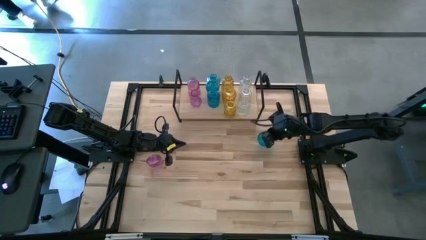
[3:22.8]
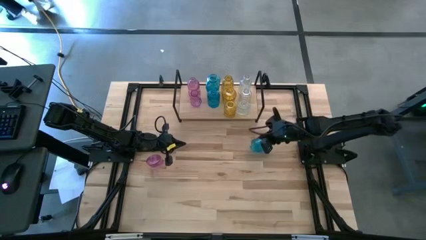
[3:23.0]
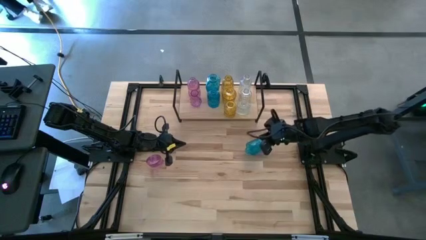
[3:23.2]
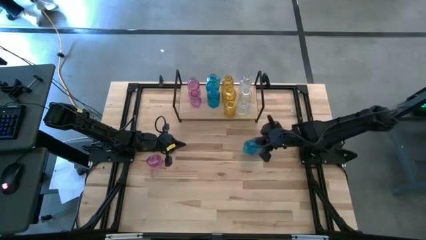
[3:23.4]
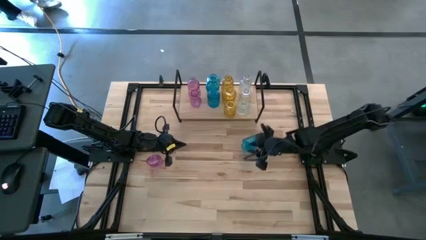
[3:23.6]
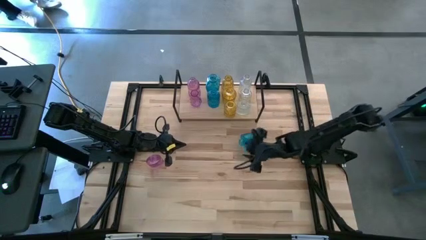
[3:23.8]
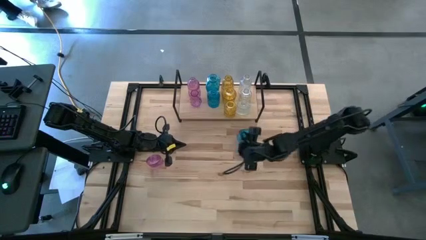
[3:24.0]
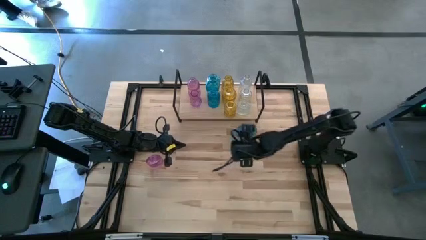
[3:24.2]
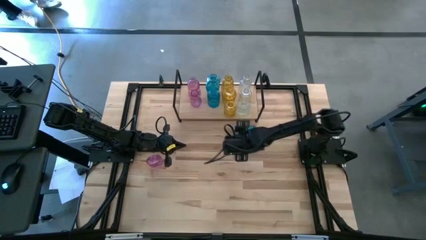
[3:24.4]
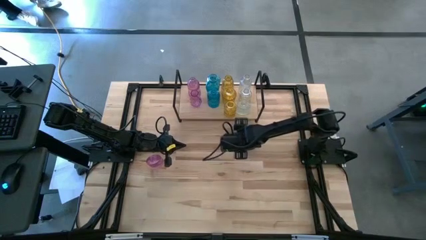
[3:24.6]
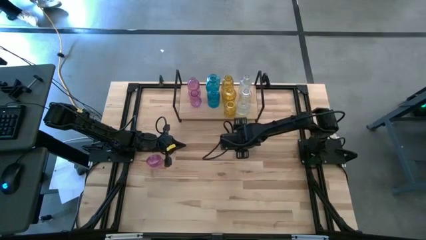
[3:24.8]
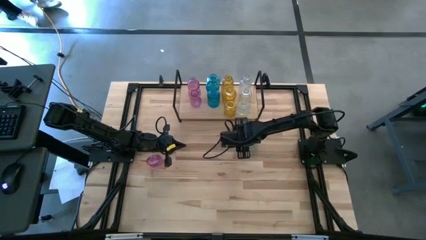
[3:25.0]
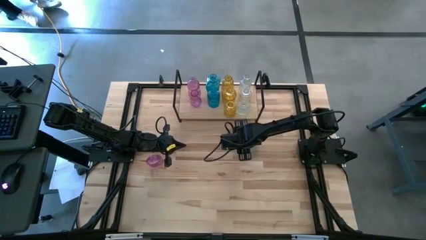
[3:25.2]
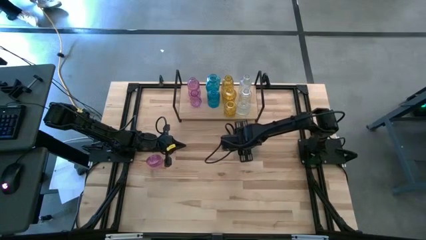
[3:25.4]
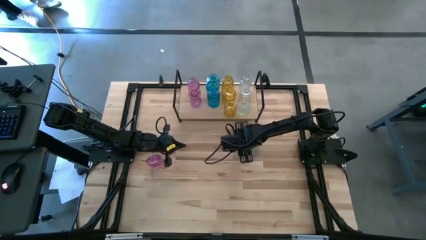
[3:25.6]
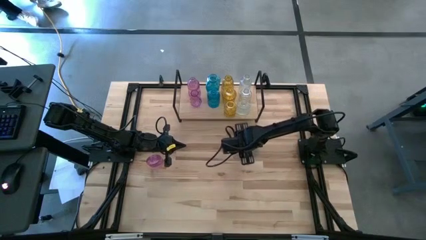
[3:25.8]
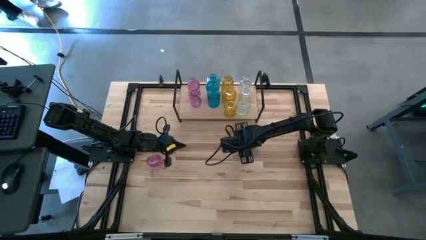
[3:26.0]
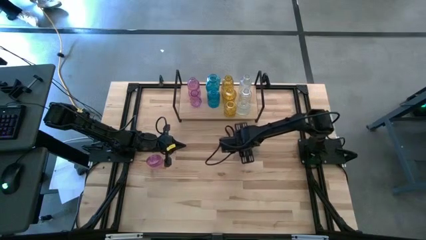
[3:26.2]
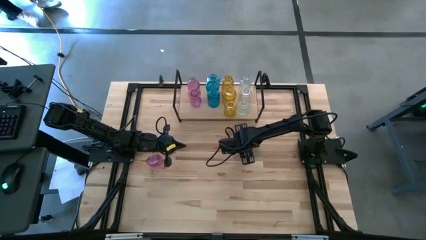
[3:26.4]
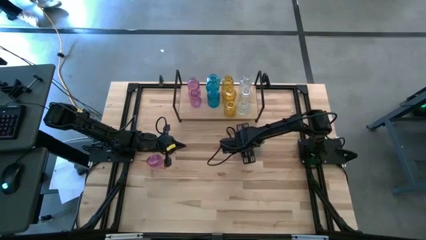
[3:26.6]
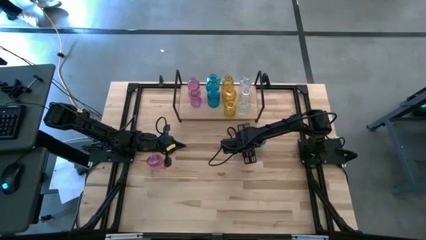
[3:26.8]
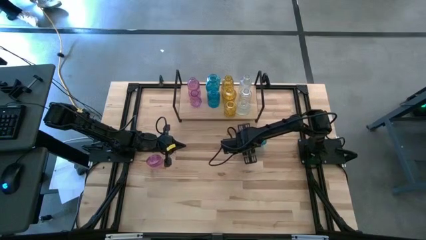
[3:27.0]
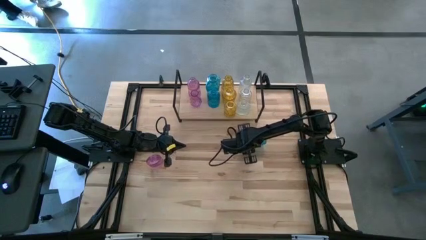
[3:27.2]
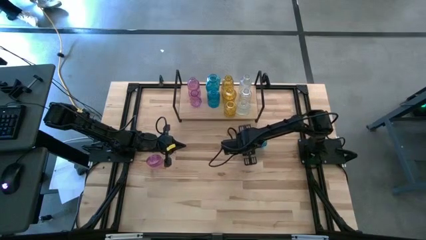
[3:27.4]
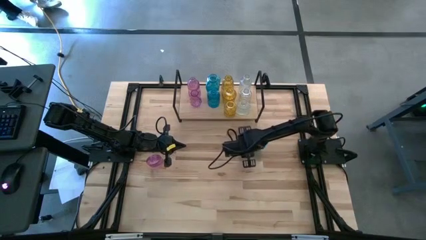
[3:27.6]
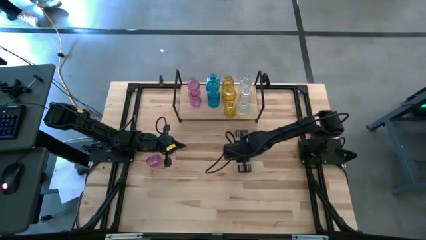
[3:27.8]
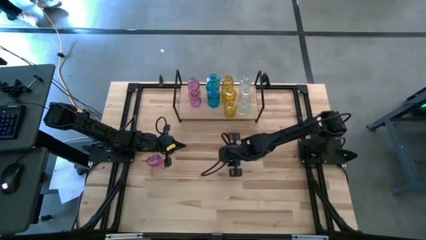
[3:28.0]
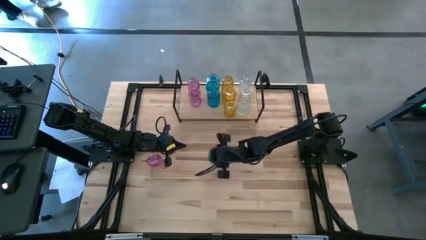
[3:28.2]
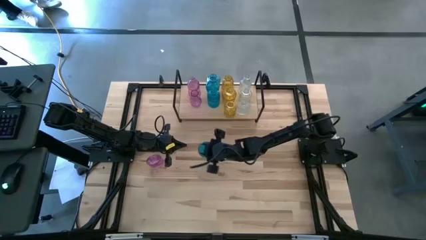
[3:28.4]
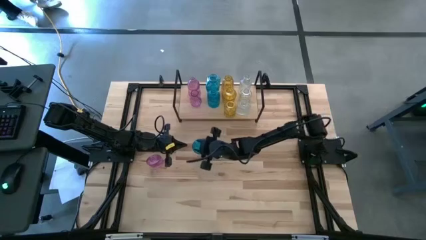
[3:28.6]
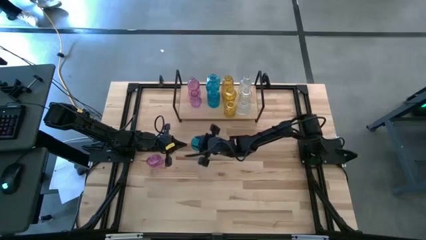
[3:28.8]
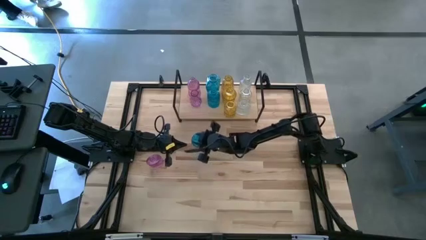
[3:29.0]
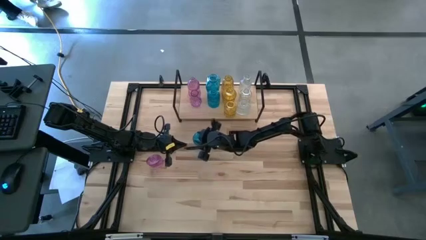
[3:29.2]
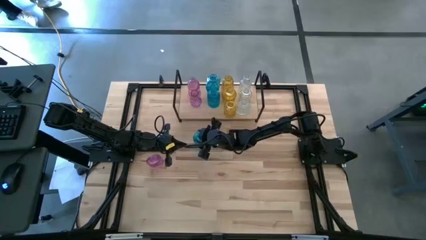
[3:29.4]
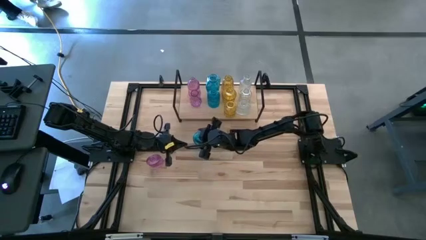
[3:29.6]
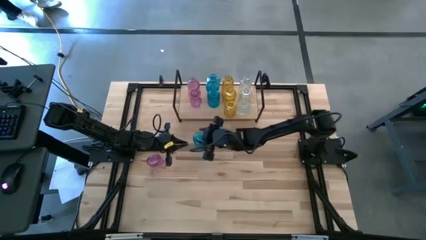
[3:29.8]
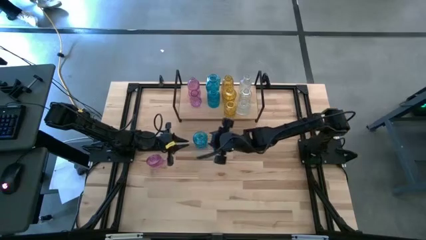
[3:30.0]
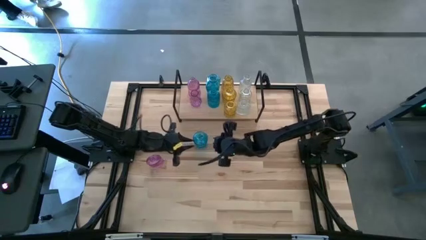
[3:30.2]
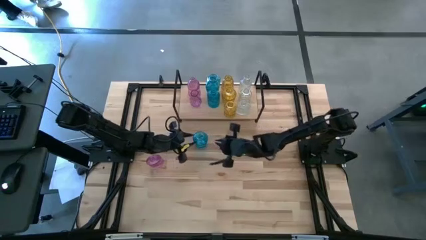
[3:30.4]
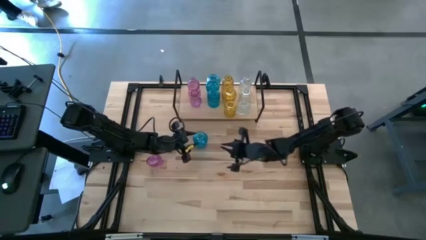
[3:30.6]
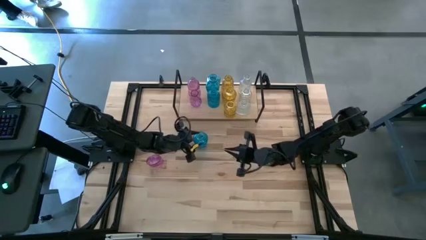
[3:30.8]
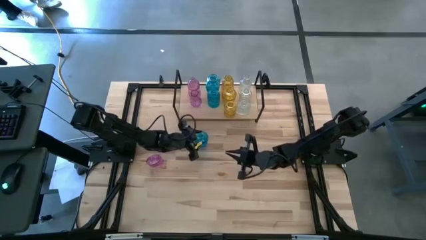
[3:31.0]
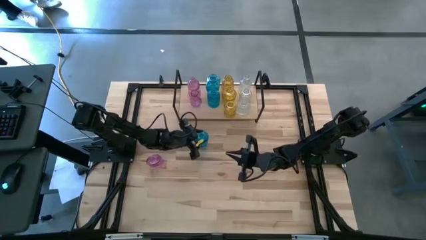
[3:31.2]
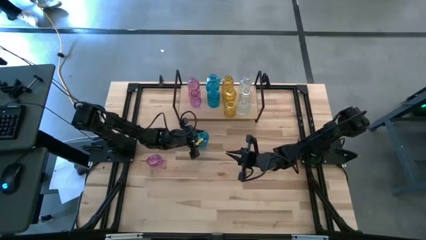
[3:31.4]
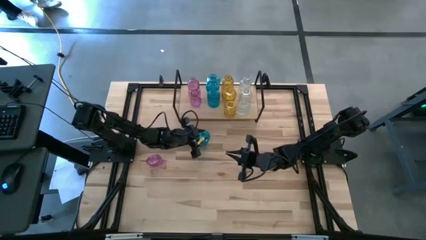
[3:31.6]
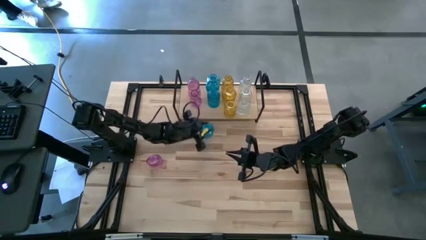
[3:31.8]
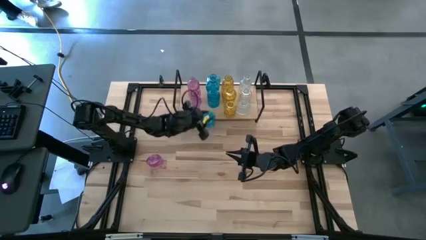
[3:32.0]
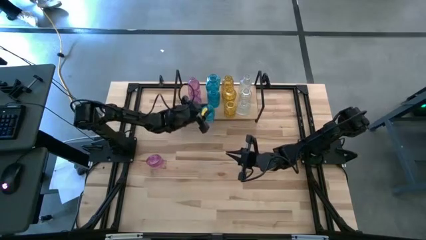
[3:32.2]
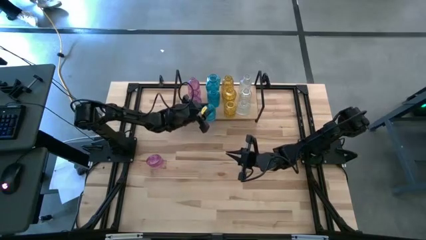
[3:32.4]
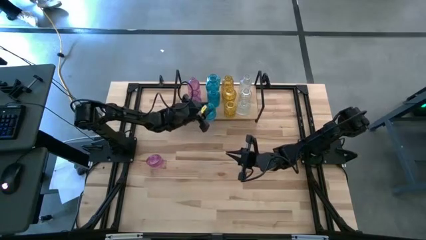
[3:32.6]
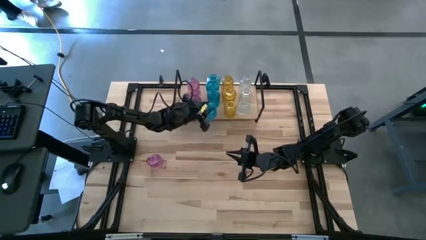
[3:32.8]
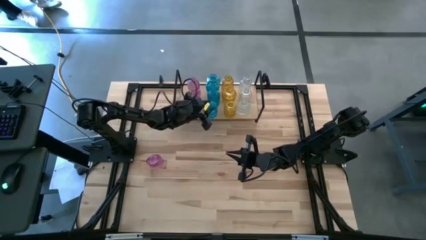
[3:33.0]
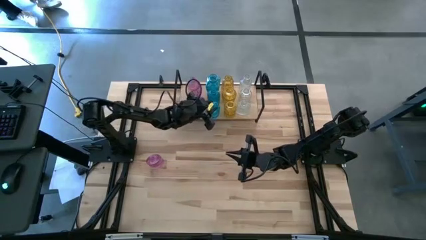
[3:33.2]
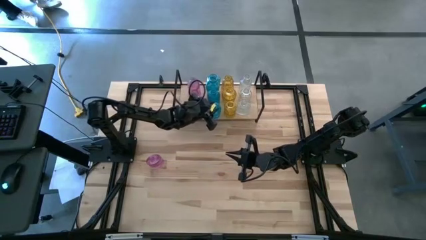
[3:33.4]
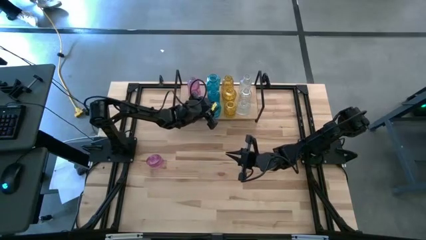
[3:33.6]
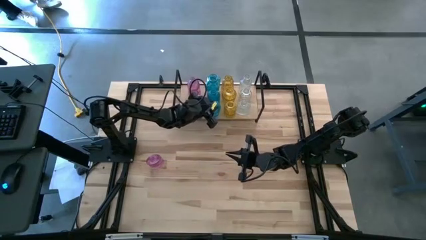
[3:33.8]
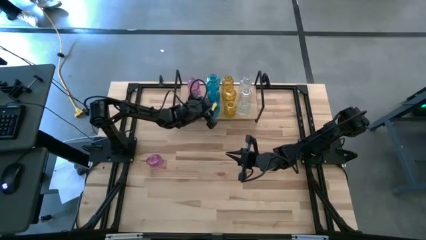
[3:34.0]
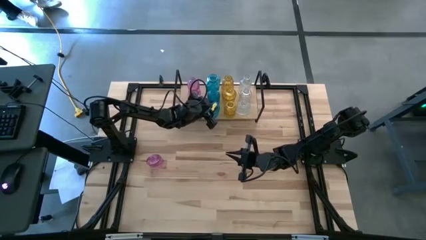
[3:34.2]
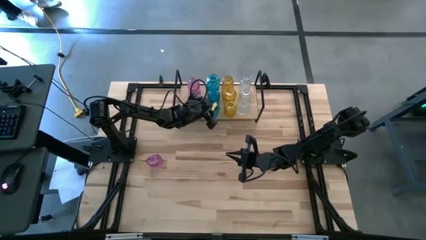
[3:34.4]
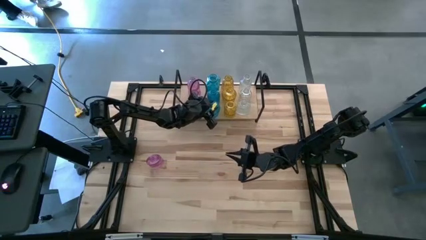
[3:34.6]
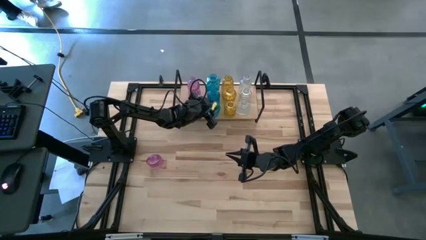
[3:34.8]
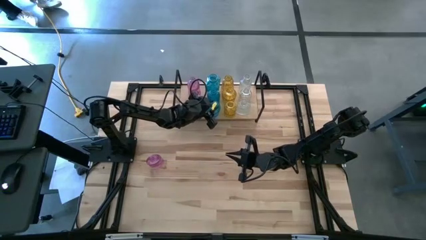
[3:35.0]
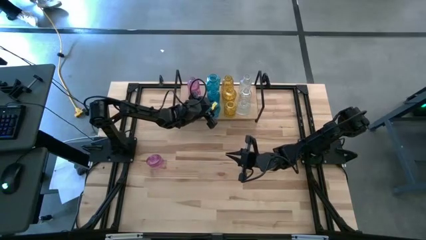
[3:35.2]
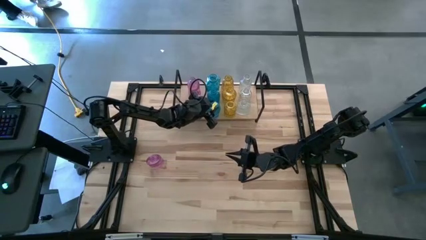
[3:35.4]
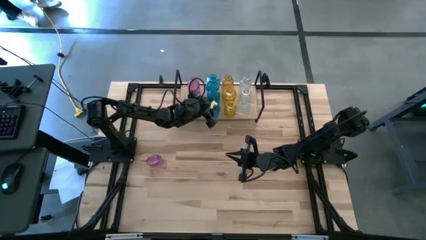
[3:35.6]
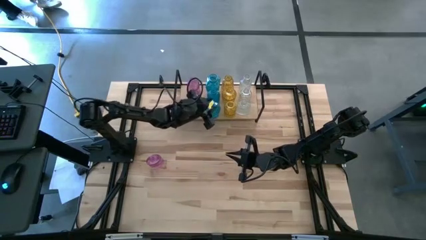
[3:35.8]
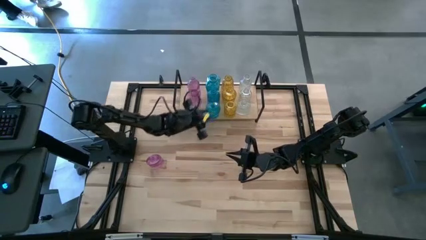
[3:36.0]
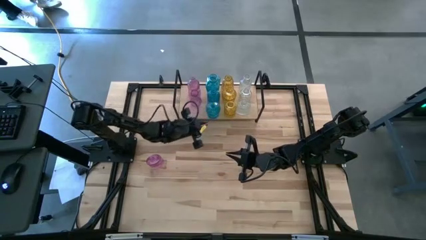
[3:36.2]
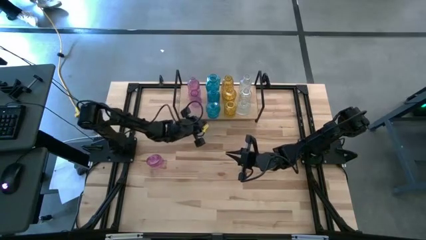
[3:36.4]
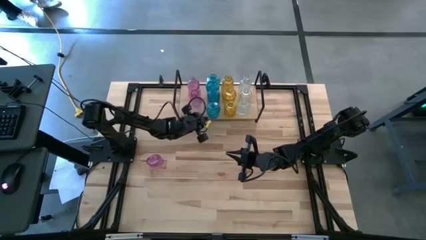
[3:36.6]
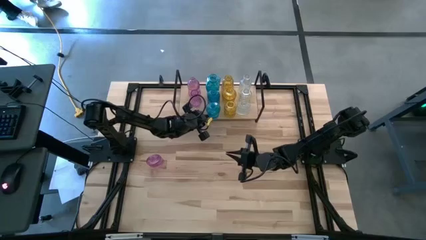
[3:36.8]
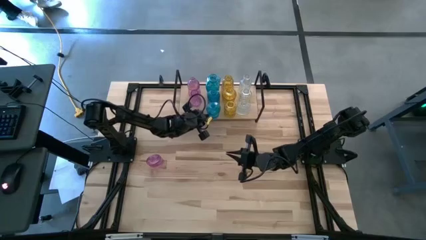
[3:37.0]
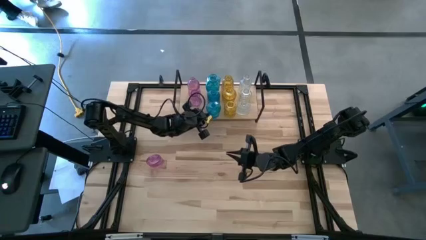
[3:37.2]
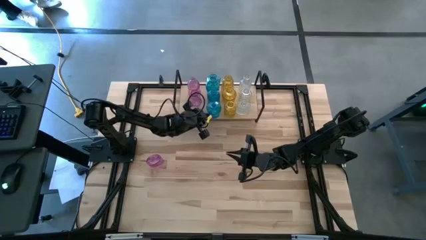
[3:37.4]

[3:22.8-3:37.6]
Task: sort vases onto shelf
Put the blue vase on the shelf aligned with the other blue vase

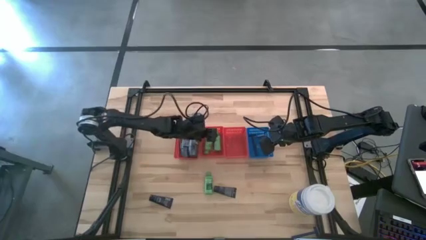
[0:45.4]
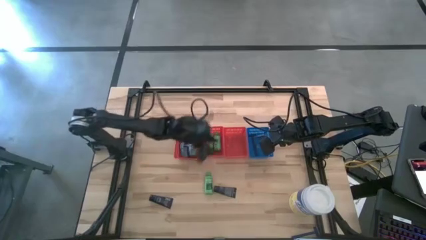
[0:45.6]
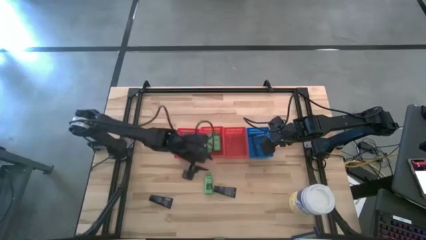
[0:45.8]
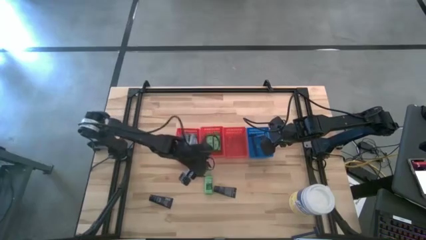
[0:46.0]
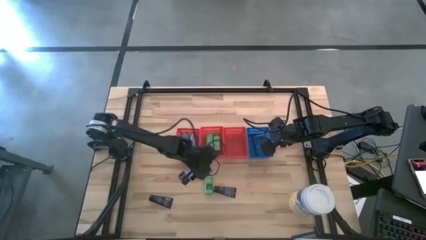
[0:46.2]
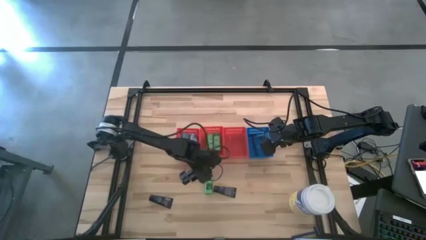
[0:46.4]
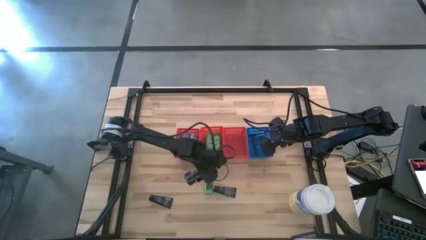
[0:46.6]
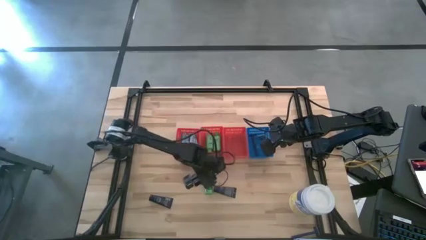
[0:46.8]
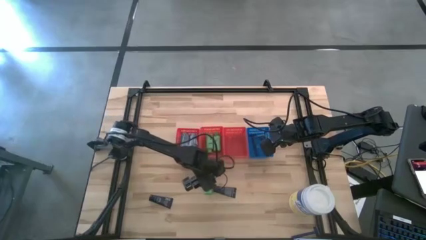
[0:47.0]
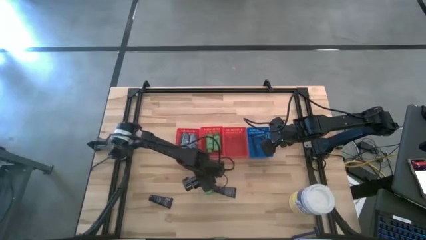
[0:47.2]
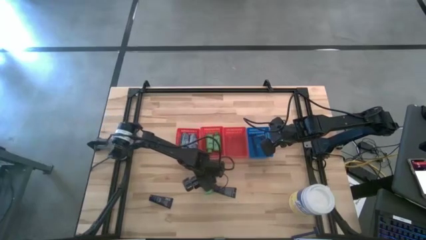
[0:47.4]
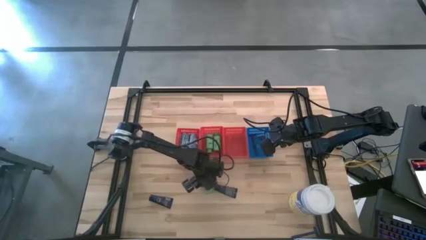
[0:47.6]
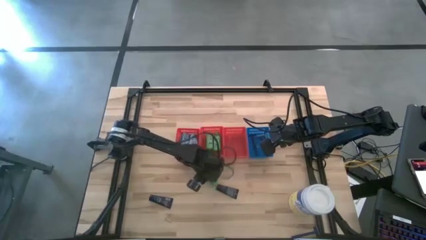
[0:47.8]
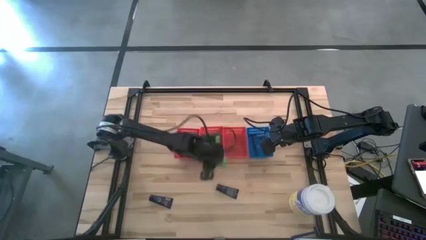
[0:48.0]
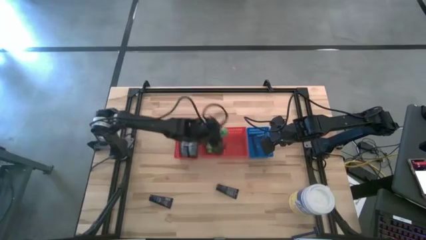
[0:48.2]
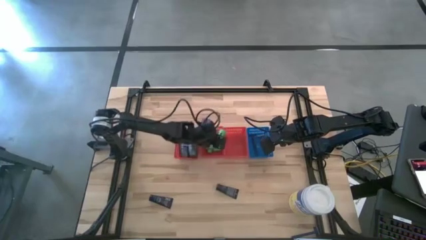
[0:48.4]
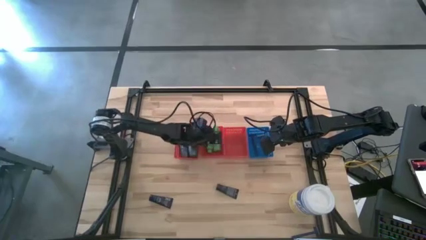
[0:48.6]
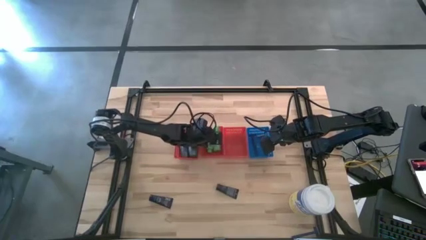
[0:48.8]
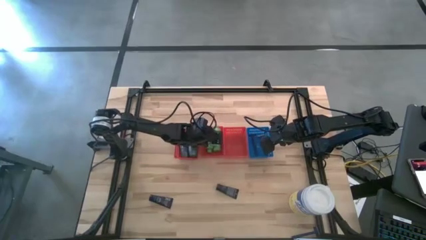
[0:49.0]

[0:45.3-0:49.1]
Task: Pick & Place Travel size toiletries
Put the green shampoo bottle into the middle red bin
